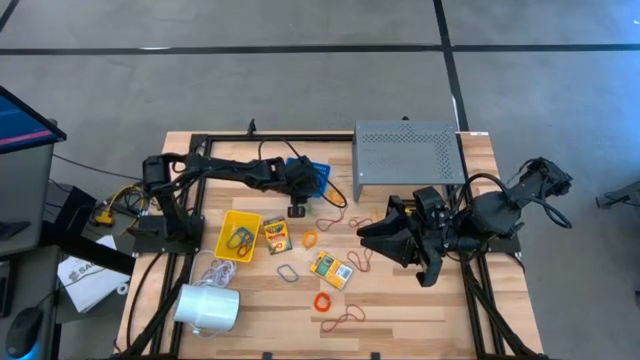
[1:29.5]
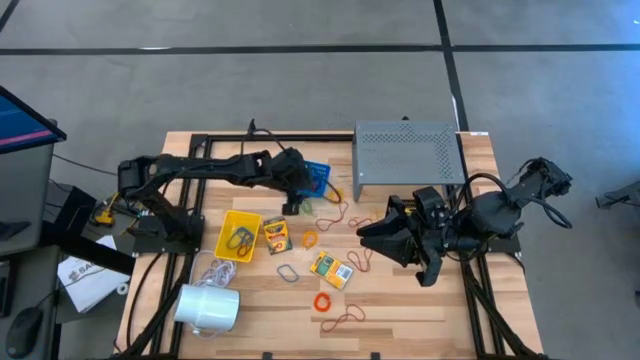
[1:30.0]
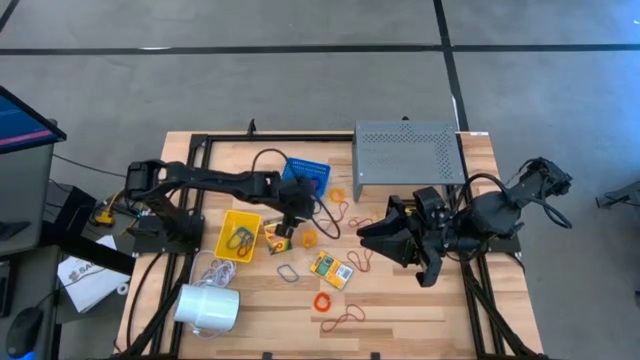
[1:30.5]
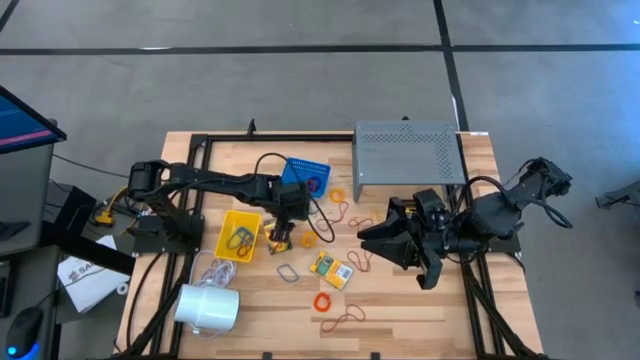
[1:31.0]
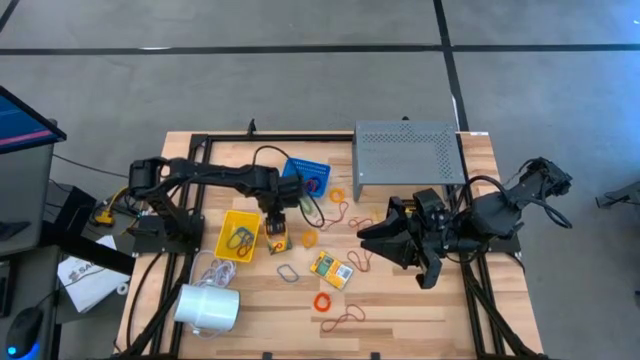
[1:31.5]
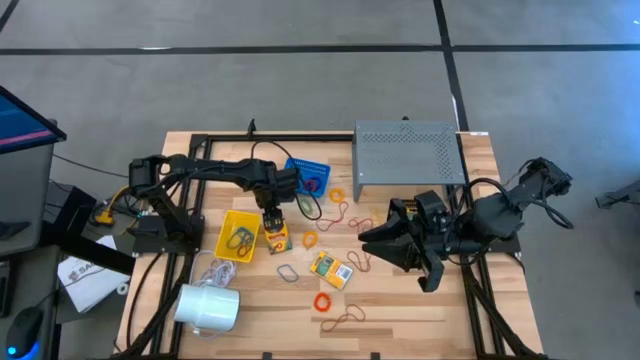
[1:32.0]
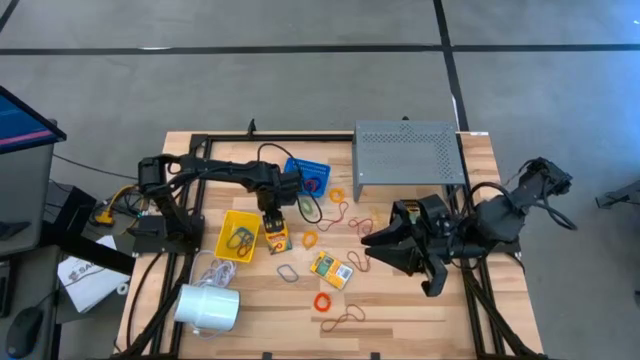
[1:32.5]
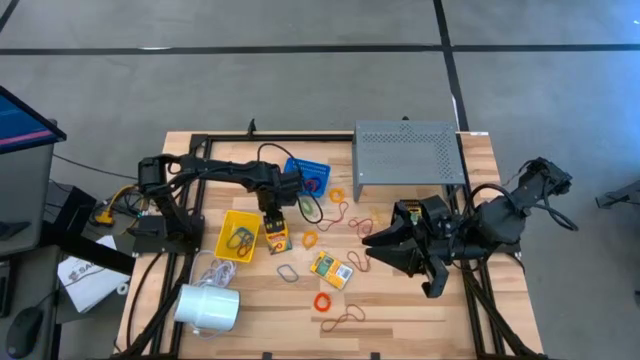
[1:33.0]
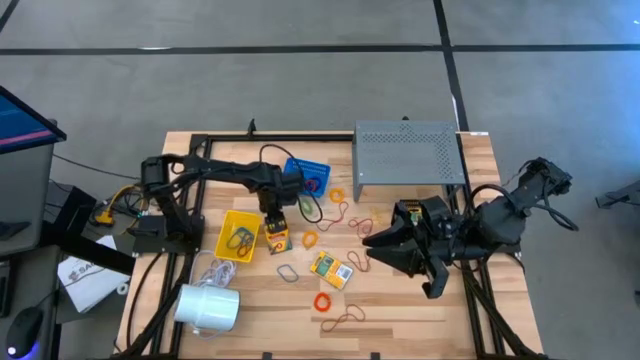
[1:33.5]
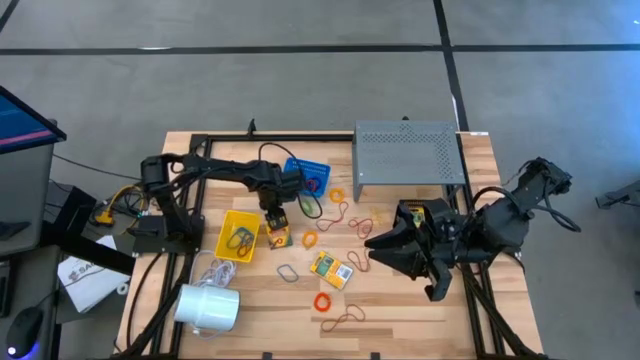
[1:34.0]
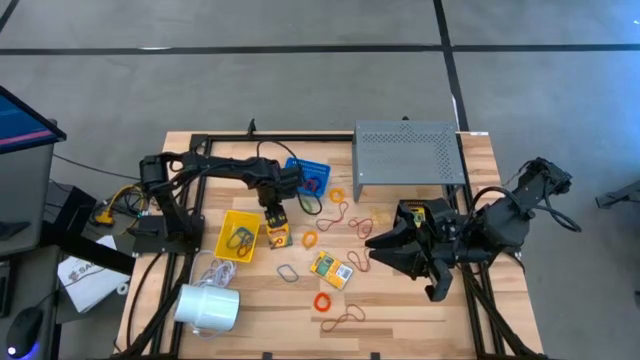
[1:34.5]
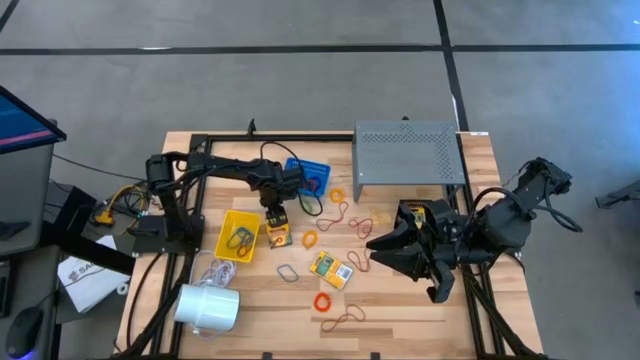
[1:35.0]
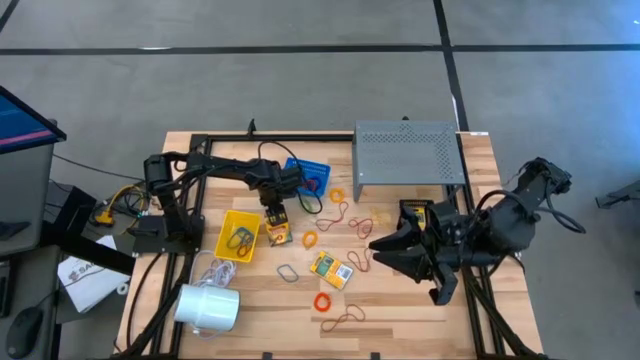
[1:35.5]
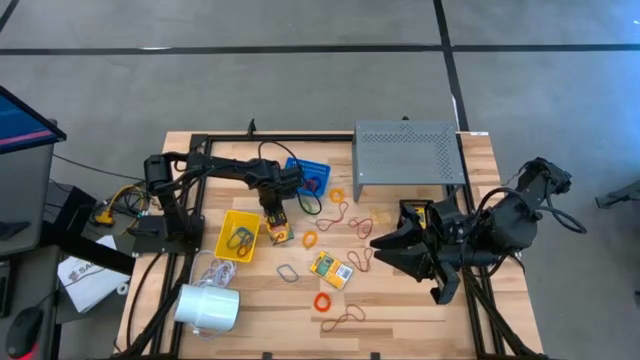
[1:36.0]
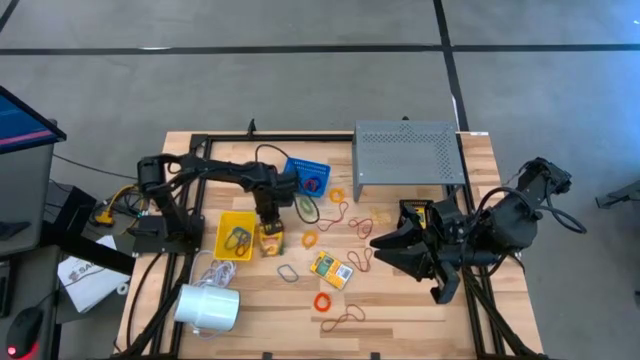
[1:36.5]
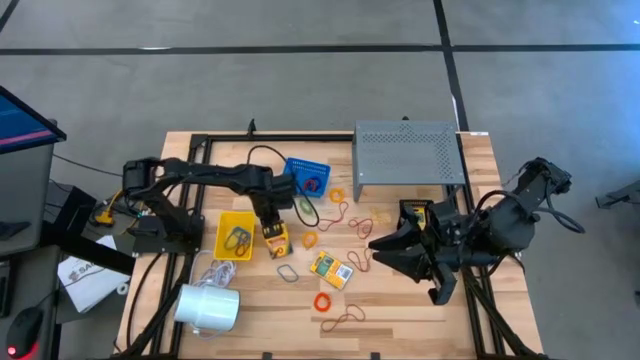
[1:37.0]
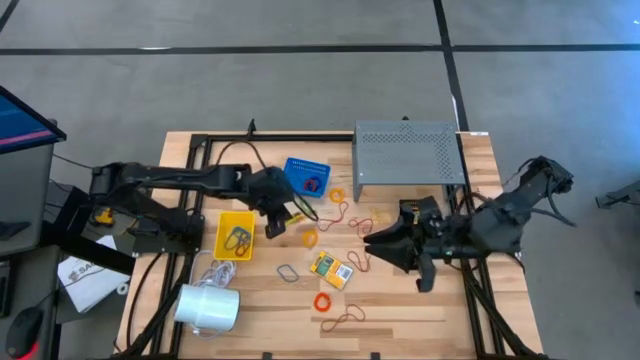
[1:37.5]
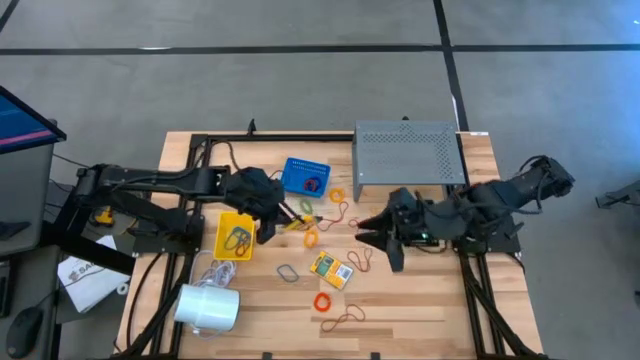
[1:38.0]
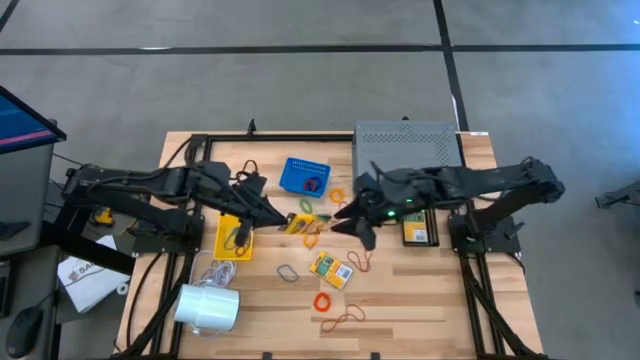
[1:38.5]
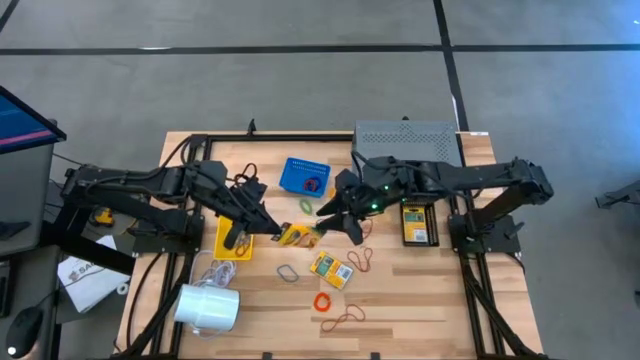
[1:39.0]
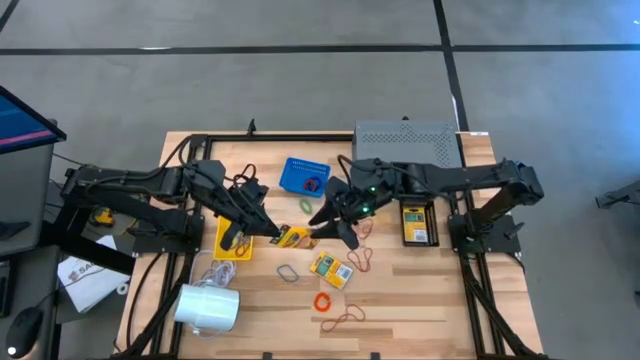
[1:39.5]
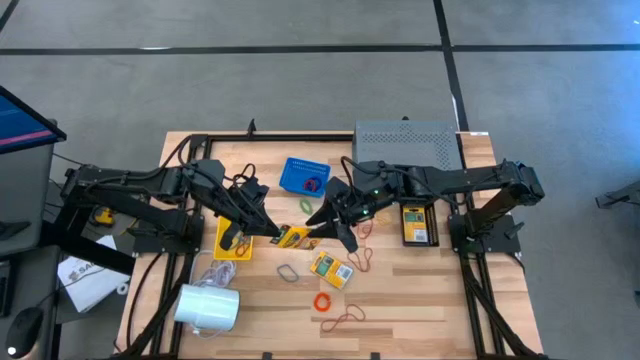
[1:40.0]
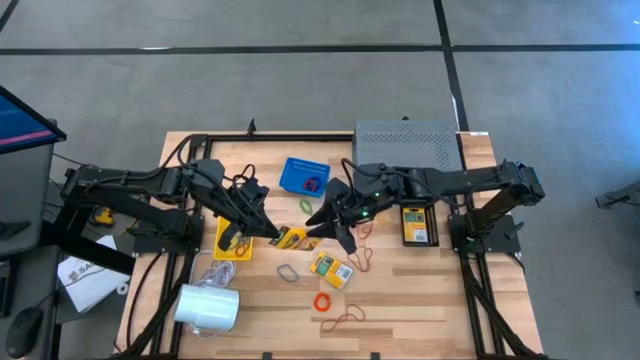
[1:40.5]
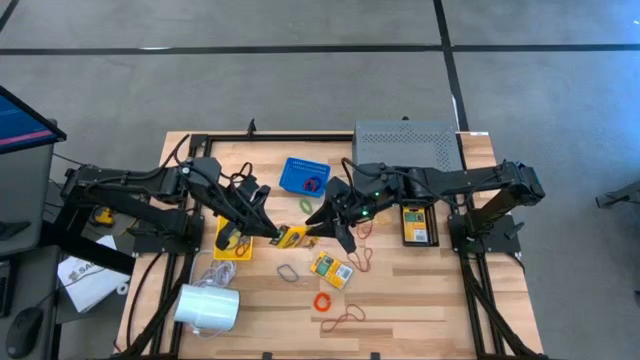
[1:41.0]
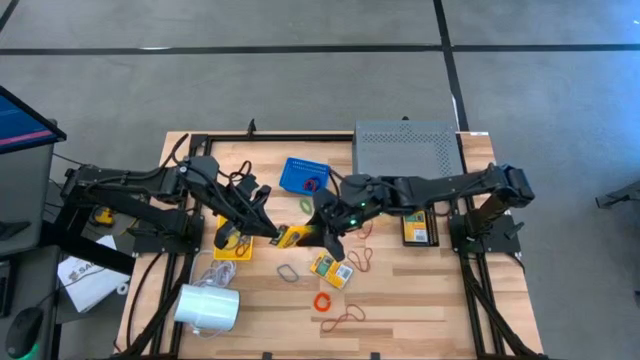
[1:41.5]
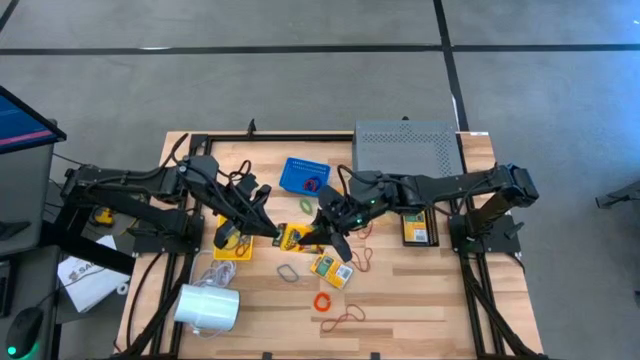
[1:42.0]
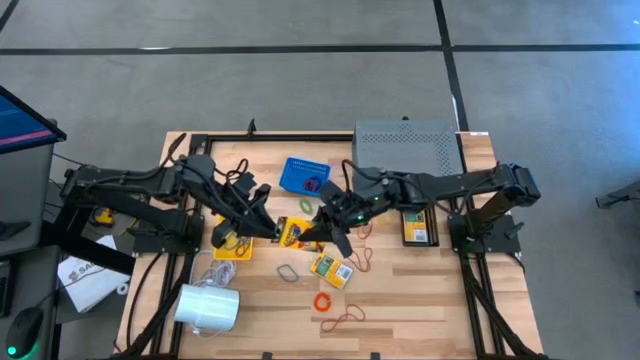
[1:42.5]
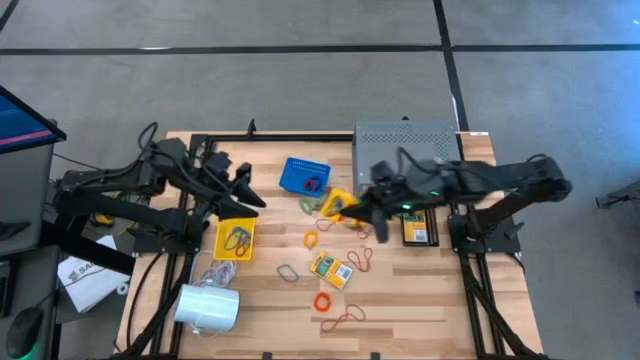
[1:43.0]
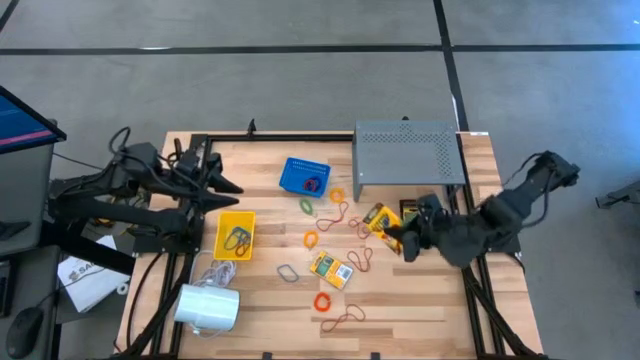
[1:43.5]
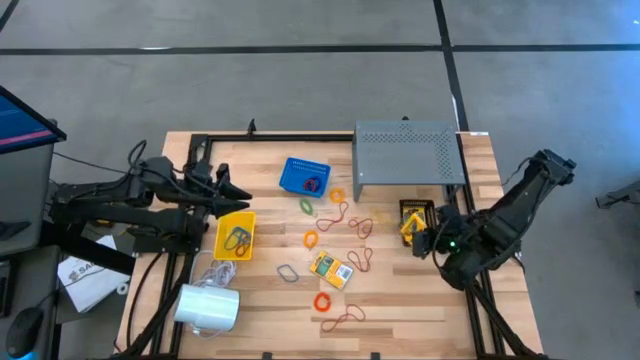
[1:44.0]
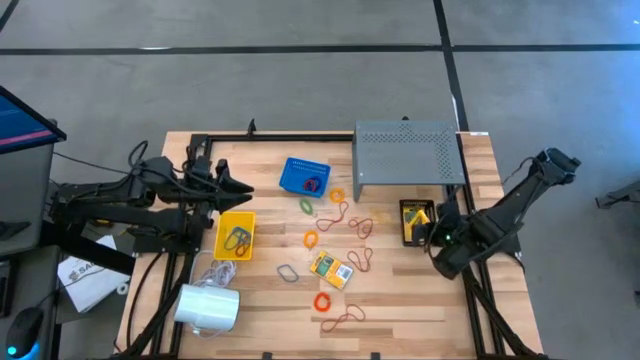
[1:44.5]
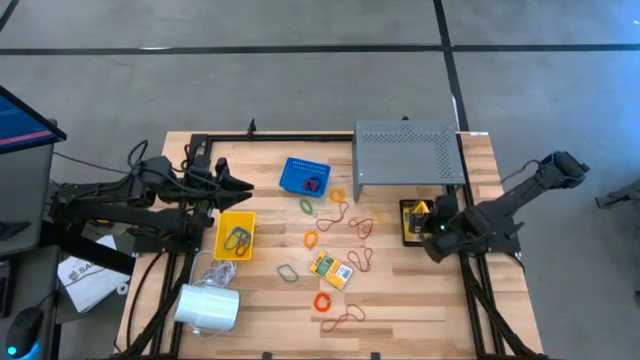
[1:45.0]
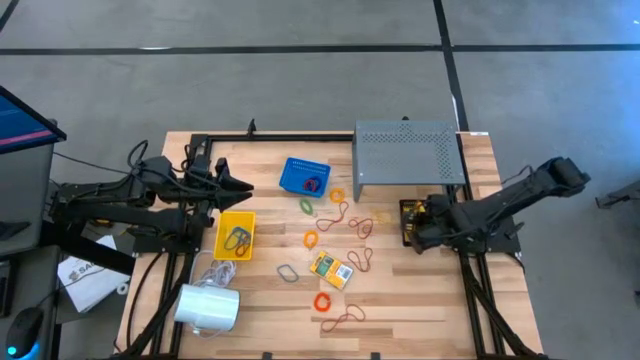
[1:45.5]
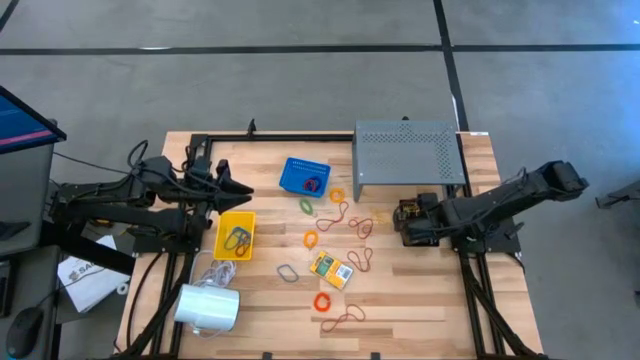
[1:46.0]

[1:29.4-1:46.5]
Task: Pick & Place Office Desk Supplies
Stack the yellow crayon box on top of the yellow crayon box

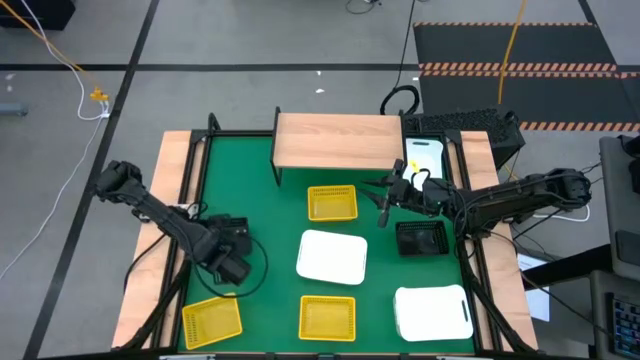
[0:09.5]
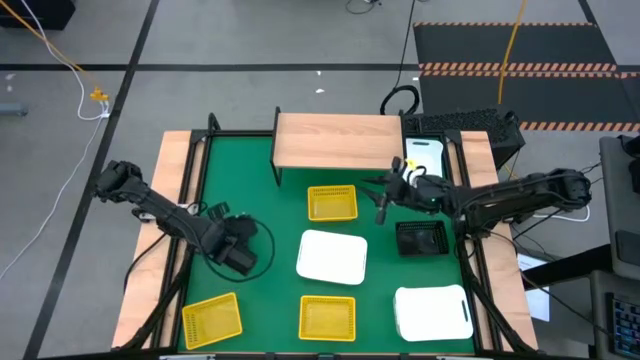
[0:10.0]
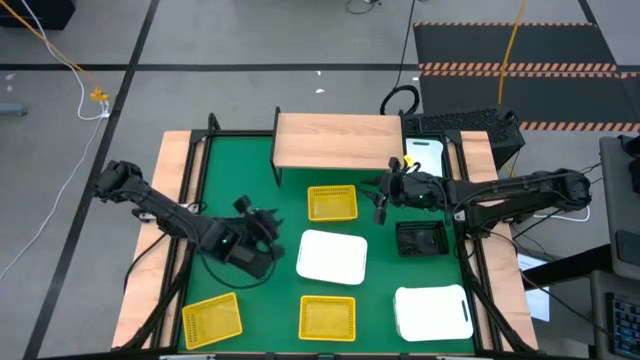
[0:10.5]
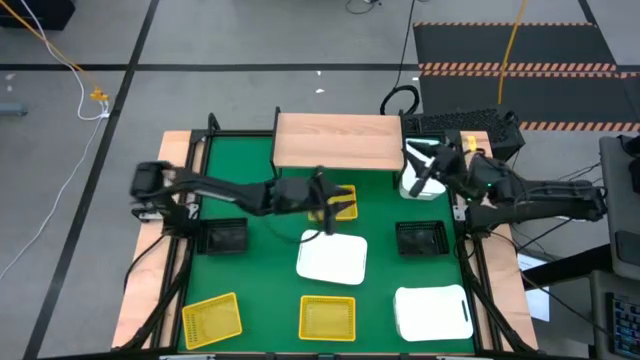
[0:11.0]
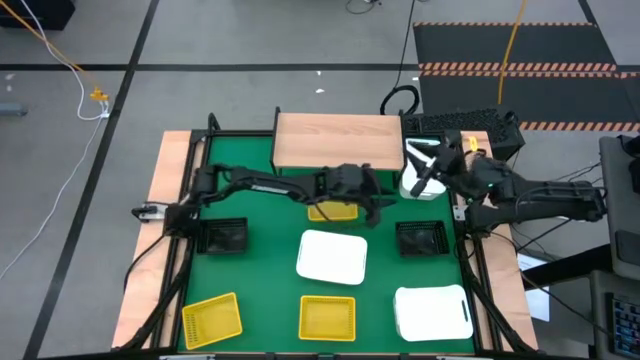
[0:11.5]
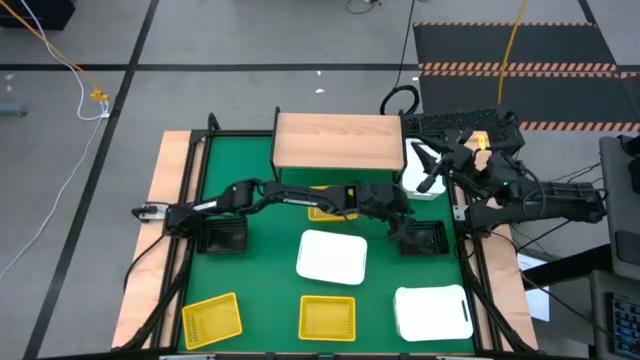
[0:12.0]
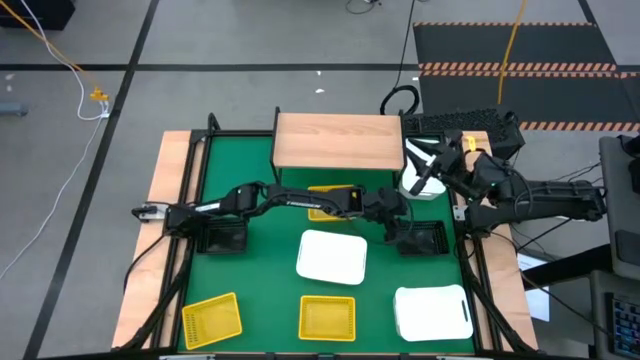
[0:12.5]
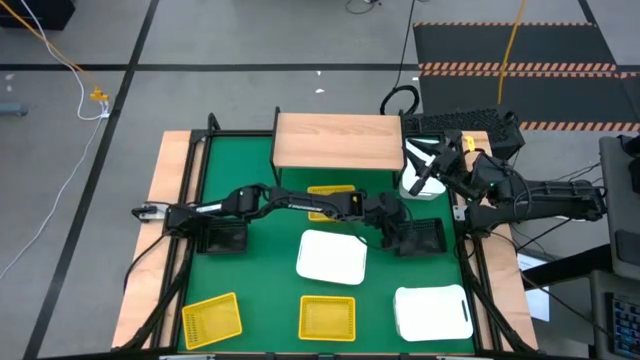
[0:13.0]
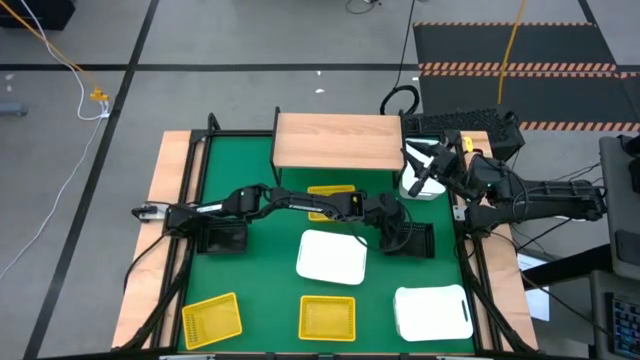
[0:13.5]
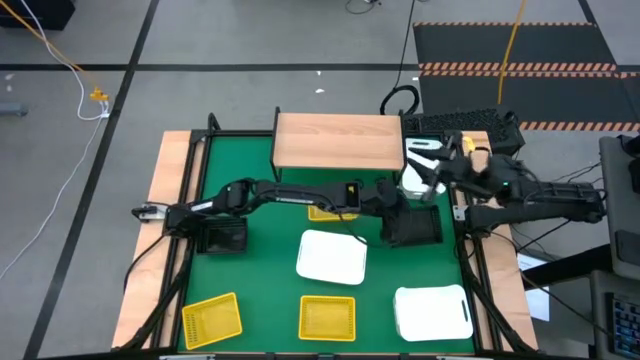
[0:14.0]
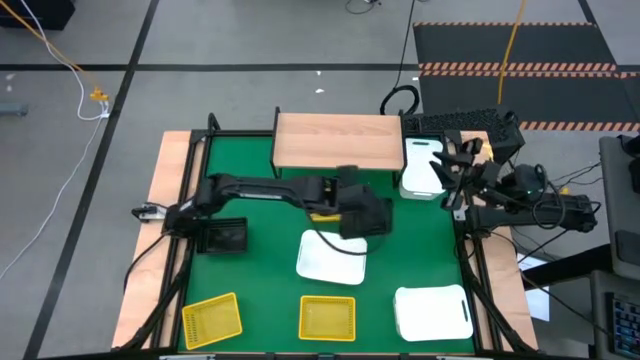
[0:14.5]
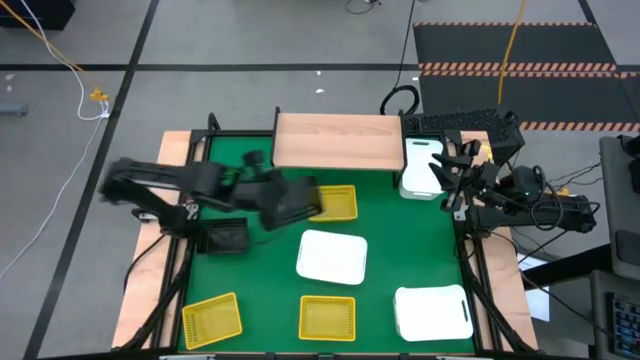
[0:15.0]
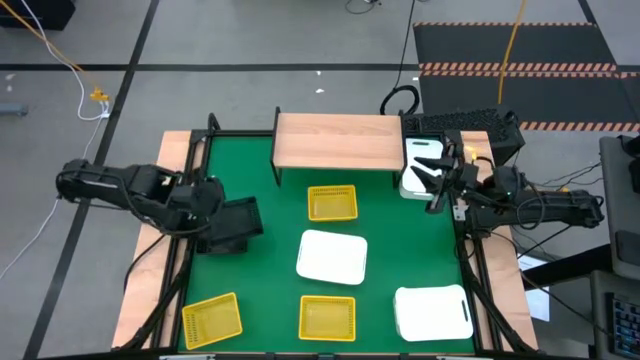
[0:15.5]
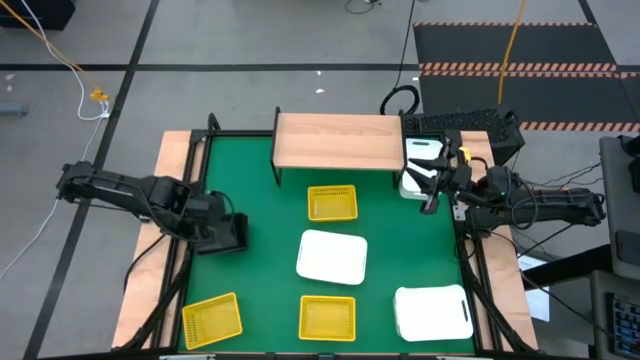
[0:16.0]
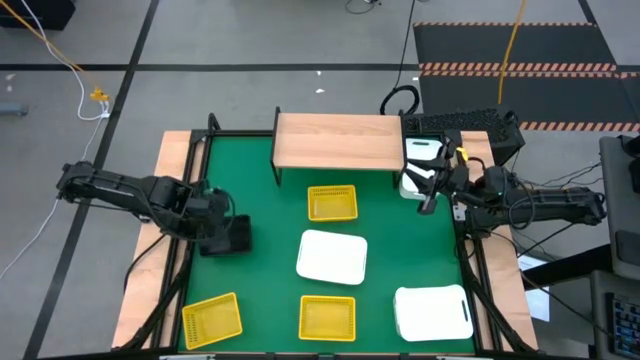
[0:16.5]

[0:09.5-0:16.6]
Task: Stack baskets on shelf by color
Stack the right black bin on top of the left black bin
